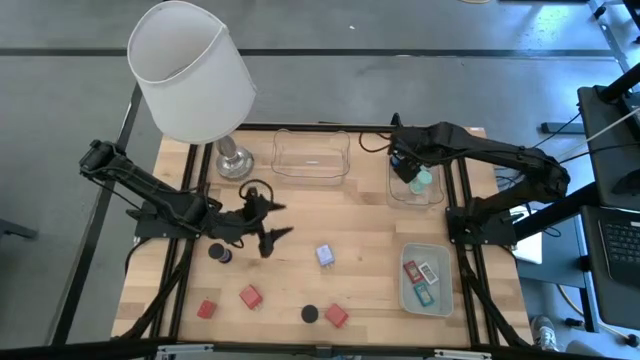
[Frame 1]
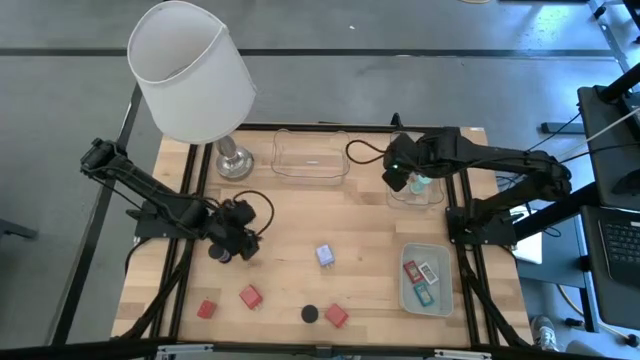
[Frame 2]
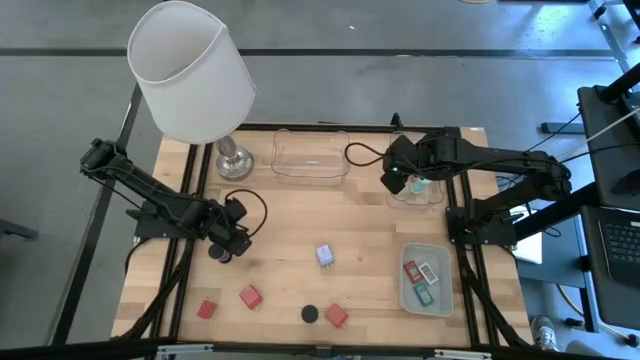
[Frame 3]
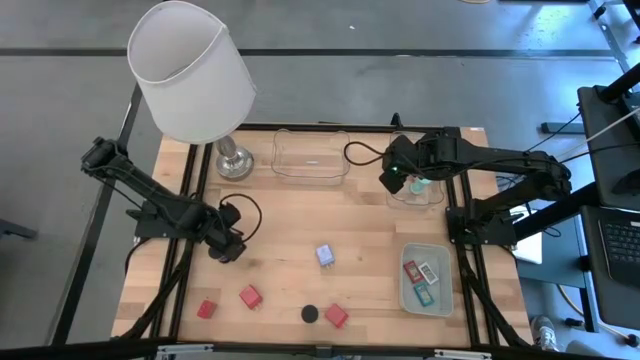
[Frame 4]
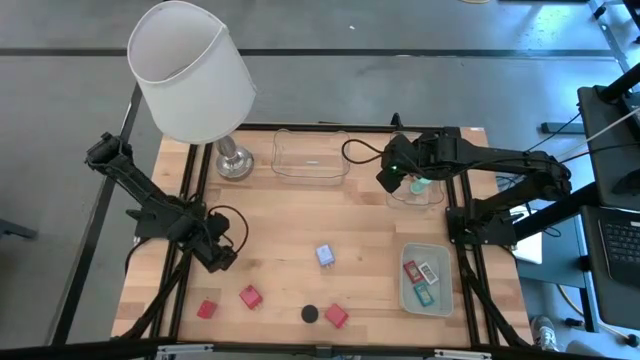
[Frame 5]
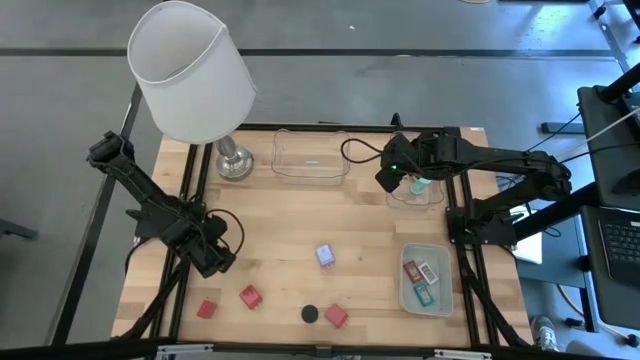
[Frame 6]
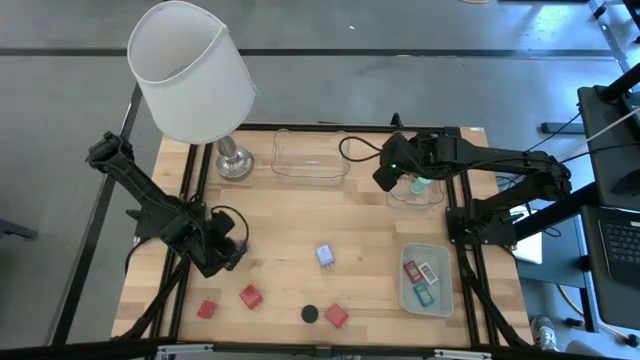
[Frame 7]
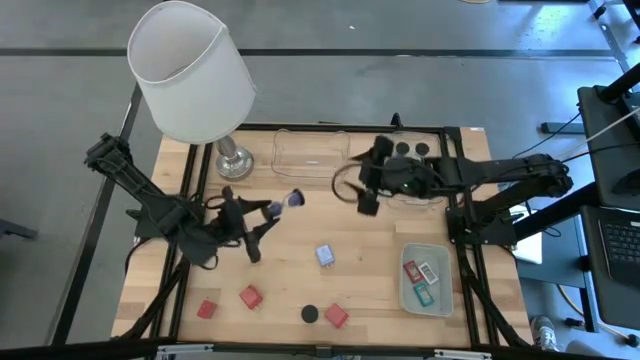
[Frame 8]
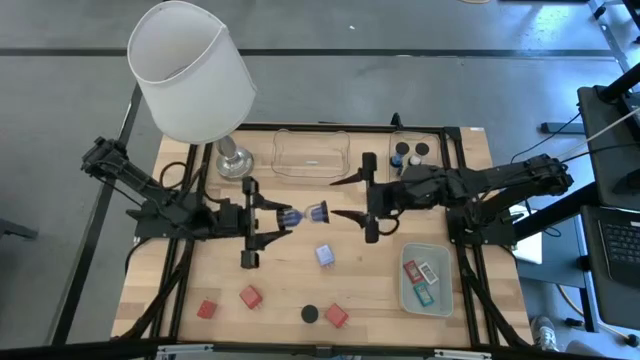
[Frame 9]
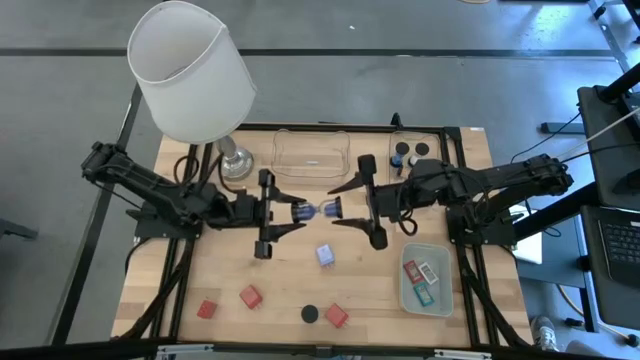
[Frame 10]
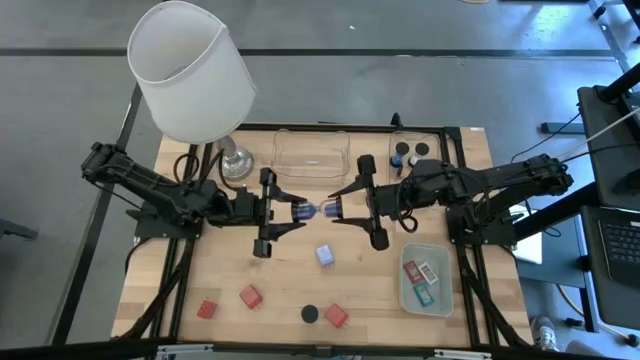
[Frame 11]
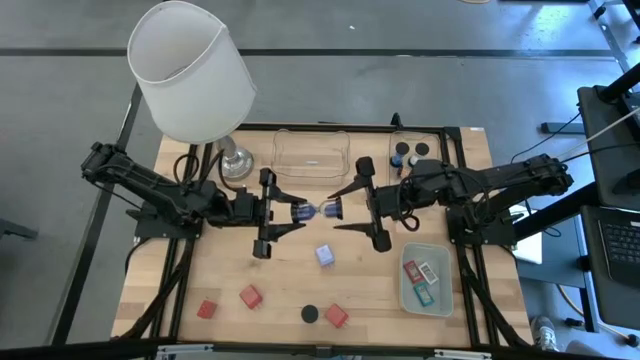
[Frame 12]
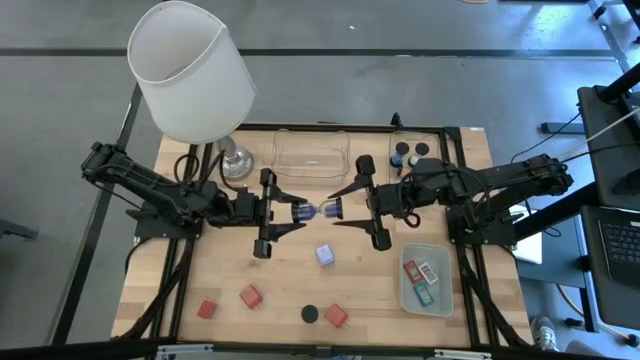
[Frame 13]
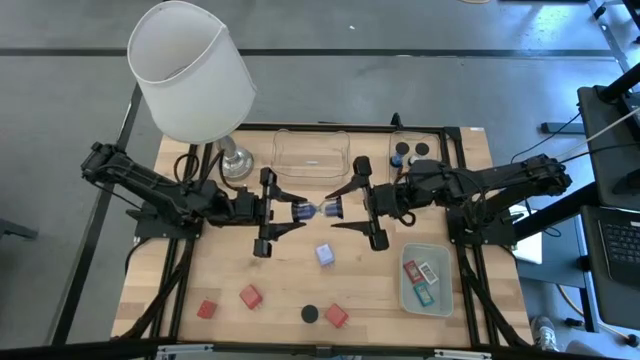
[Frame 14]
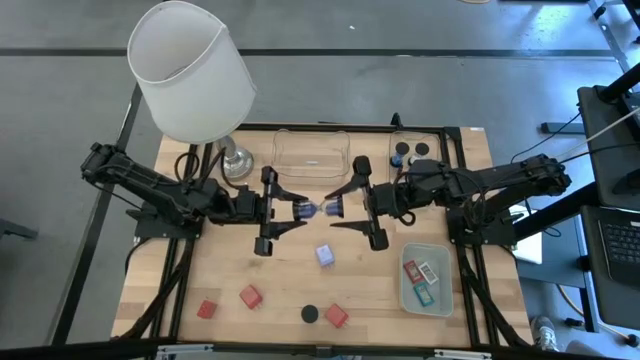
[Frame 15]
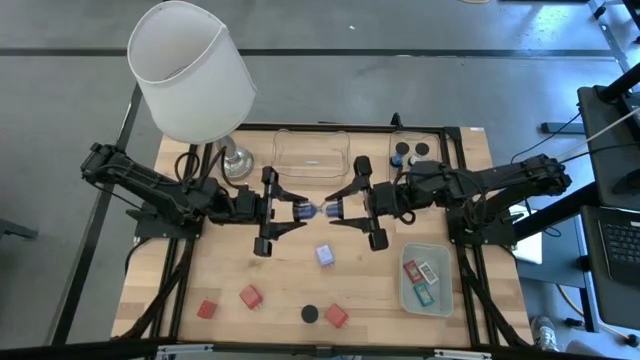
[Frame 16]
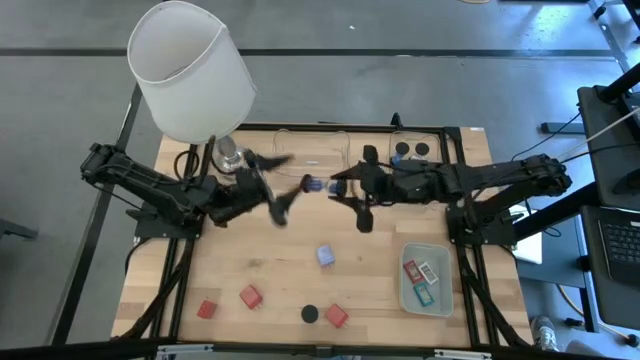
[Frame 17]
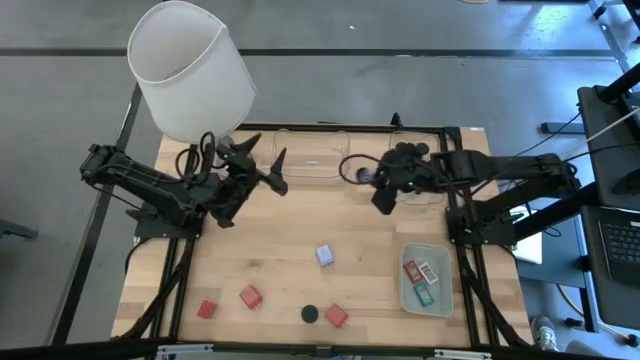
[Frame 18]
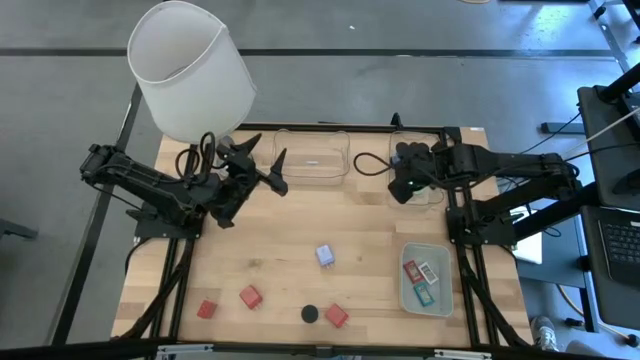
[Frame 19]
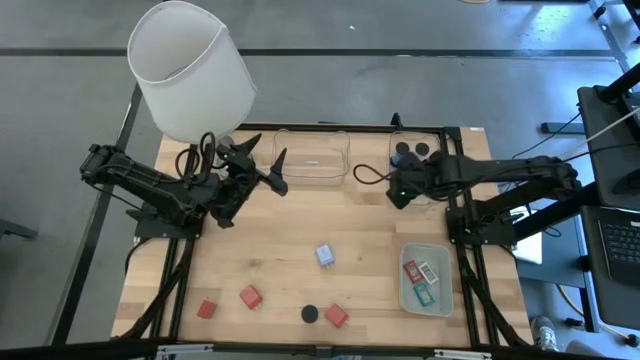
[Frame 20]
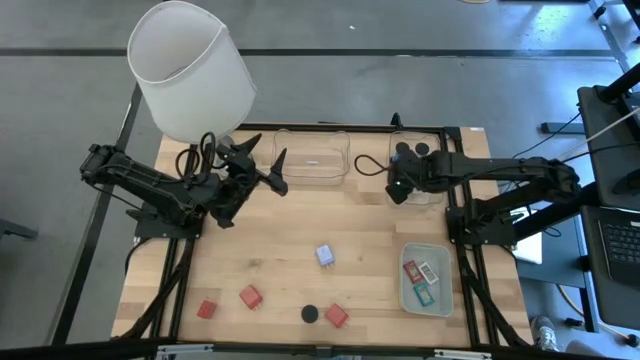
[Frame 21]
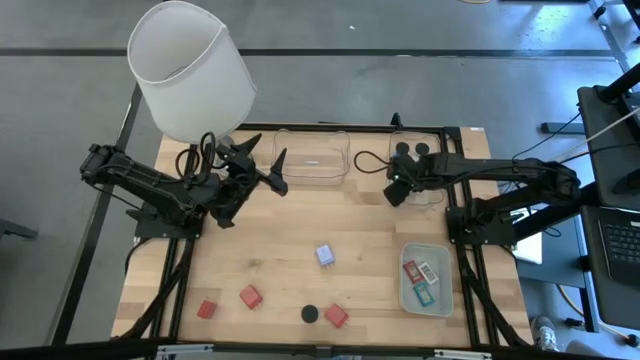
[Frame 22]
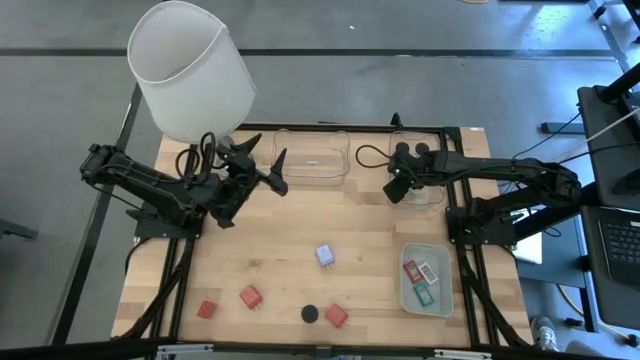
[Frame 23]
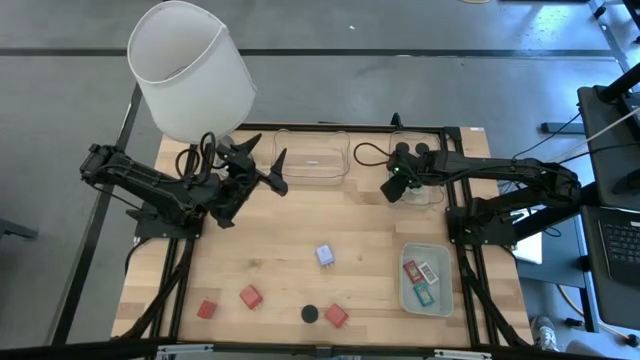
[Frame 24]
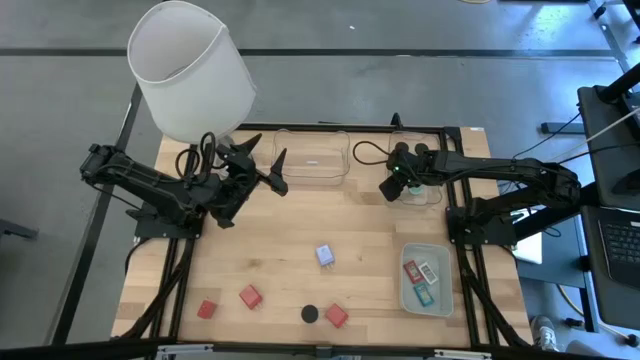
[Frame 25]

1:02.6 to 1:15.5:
Task: Pick & Place Office items
Put the violet hourglass into the right transparent bin

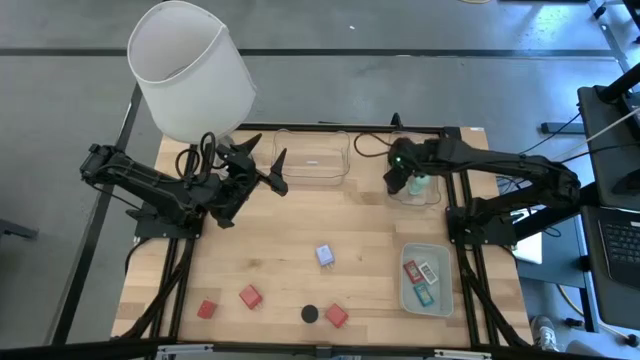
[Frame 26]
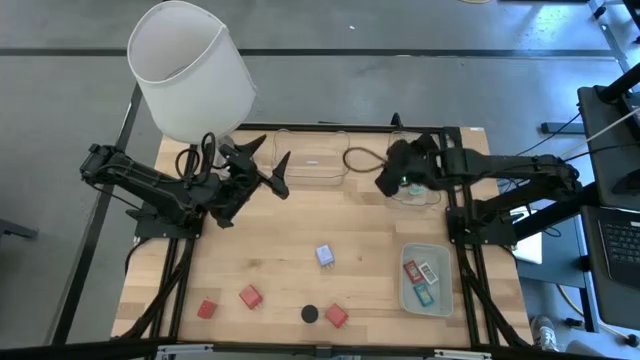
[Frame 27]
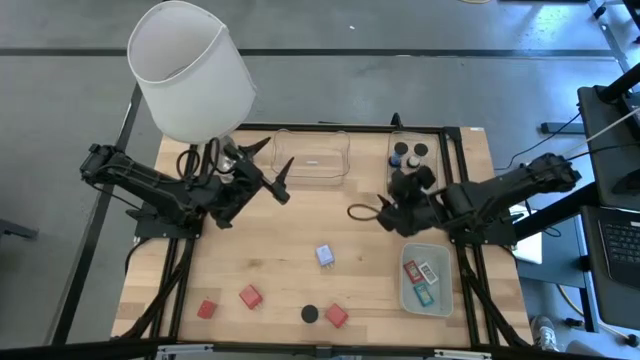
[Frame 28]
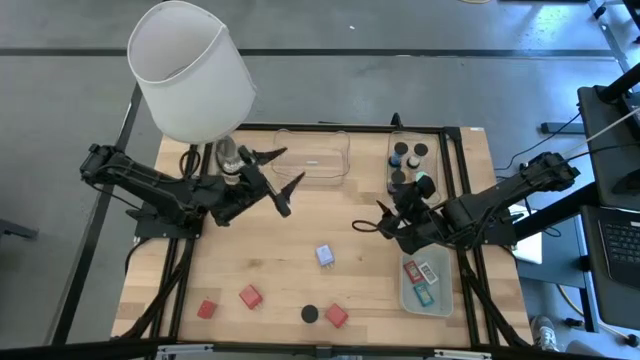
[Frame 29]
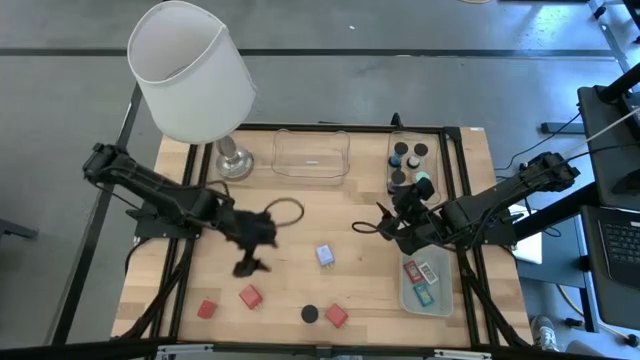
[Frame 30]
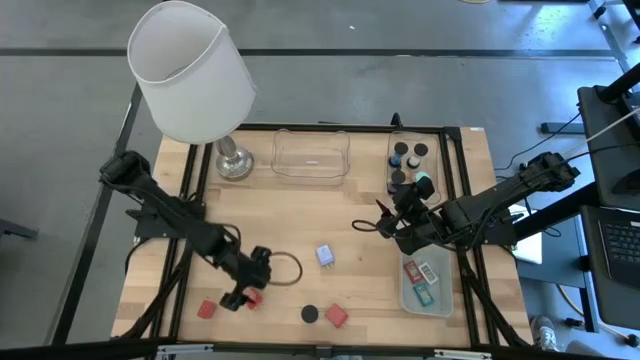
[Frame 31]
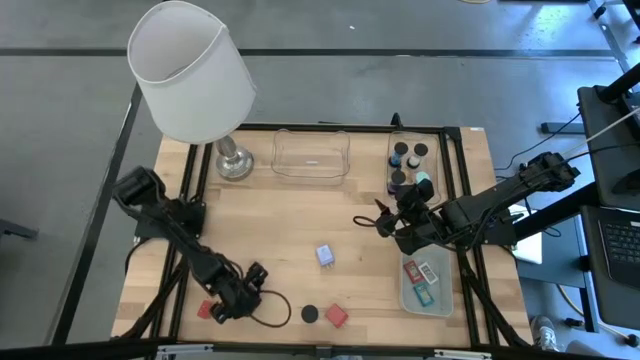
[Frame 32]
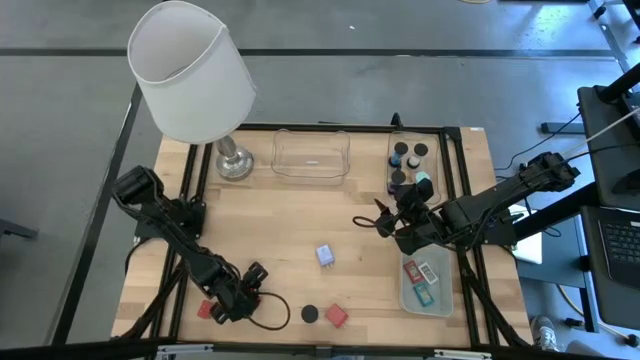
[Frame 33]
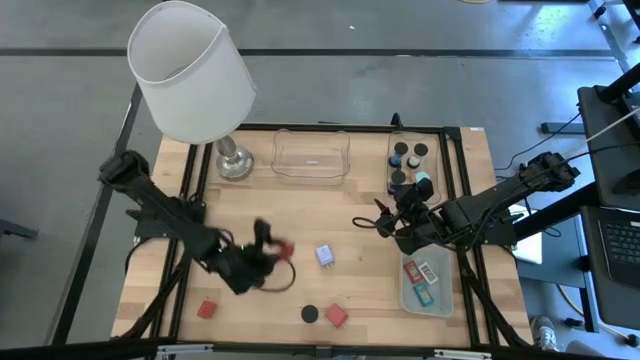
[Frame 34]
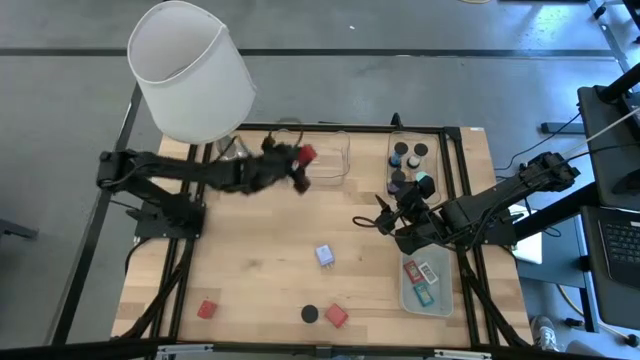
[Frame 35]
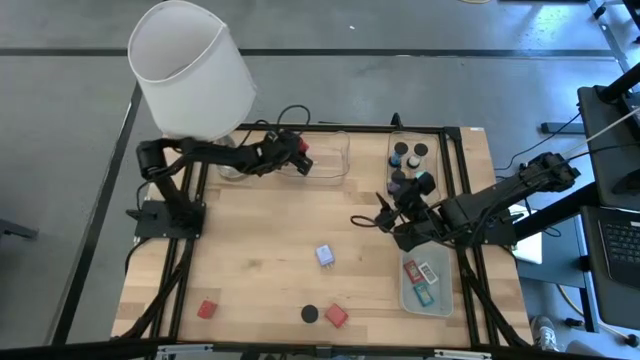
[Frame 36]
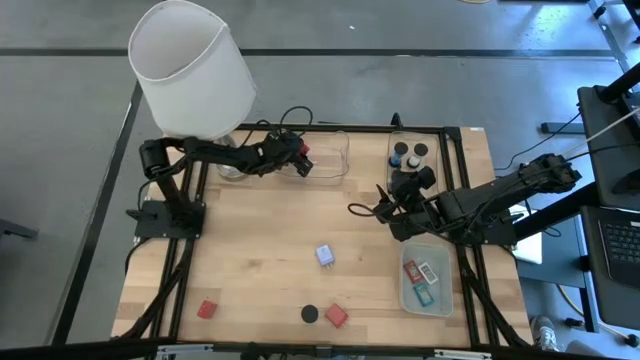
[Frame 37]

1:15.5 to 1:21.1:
Put the middle red charger adapter into the left transparent bin

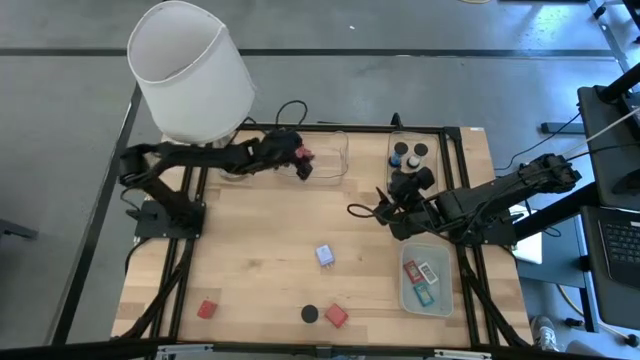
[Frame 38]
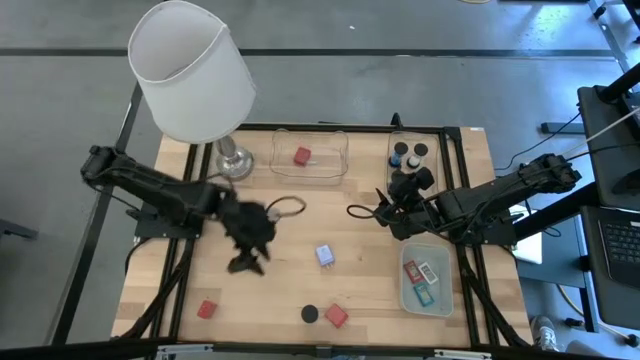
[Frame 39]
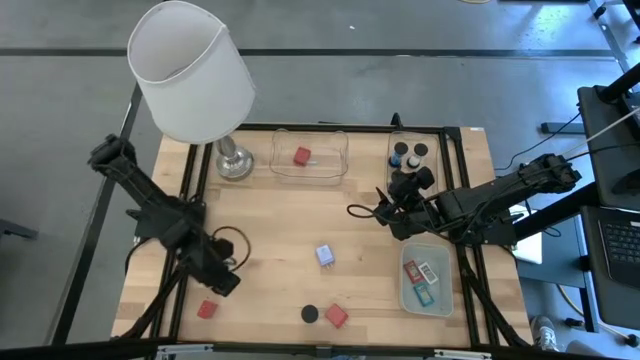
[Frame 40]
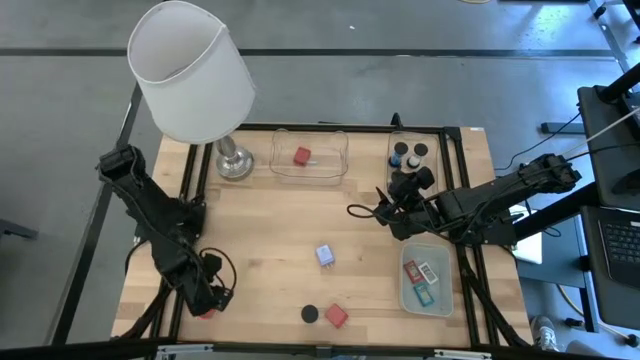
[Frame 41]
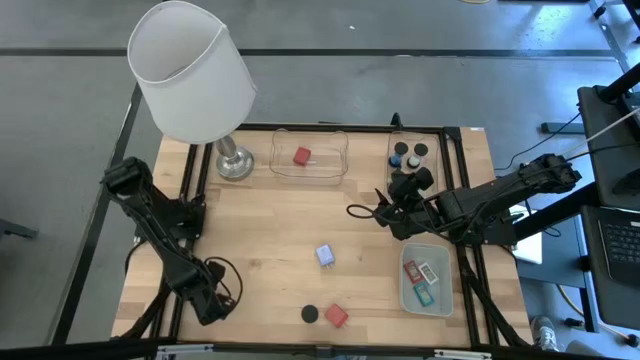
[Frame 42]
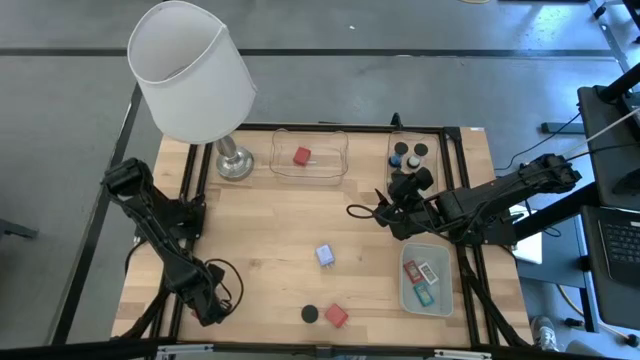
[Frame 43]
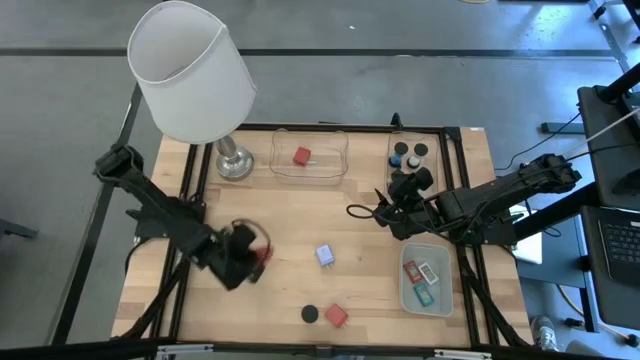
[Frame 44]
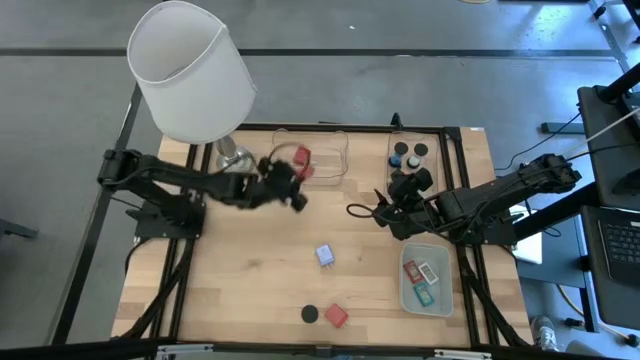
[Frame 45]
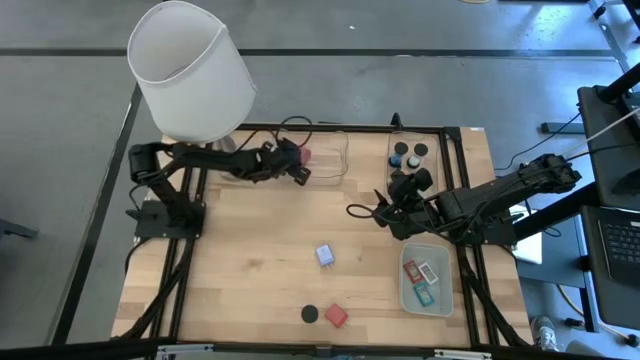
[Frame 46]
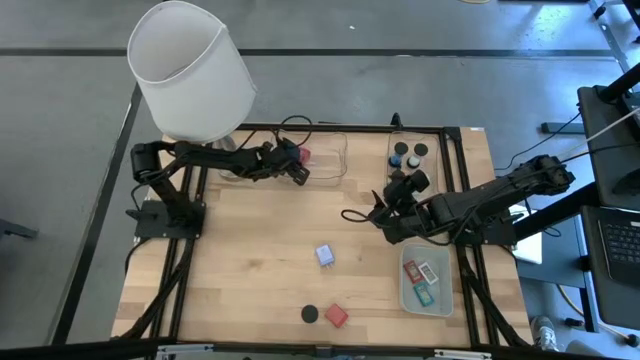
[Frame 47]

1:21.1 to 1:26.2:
Put the left red charger adapter into the left transparent bin
